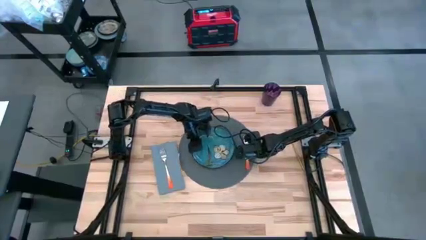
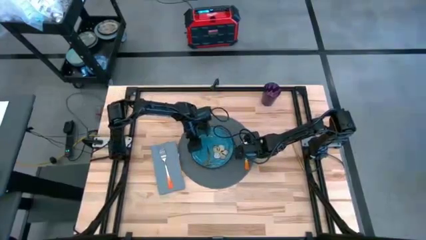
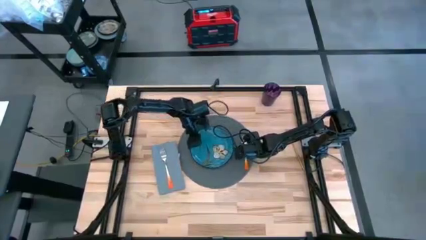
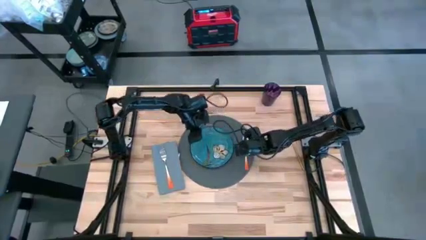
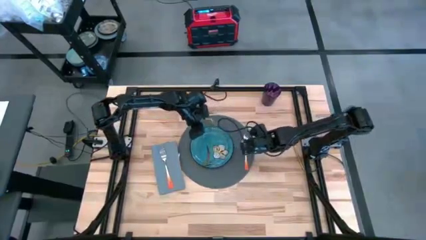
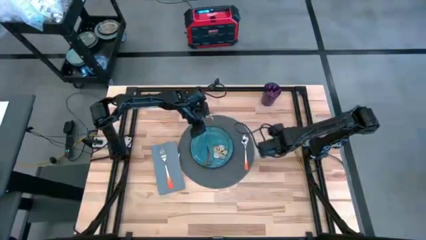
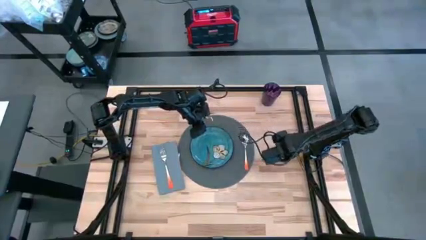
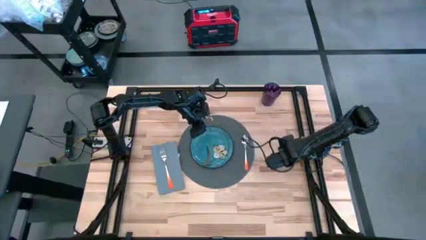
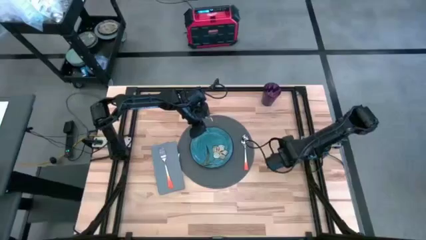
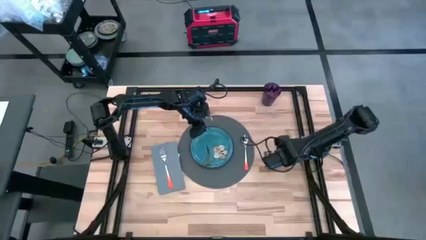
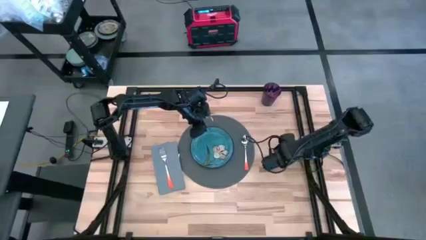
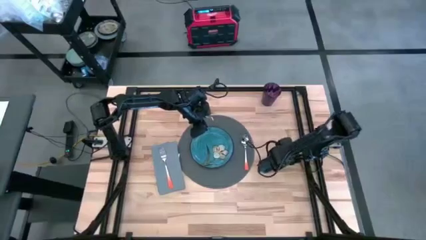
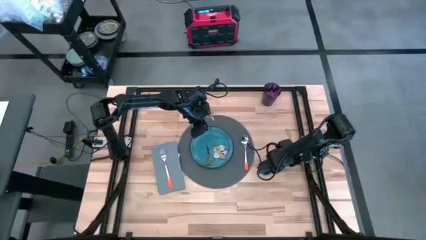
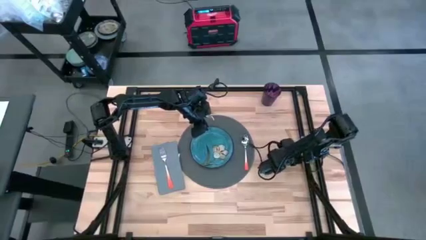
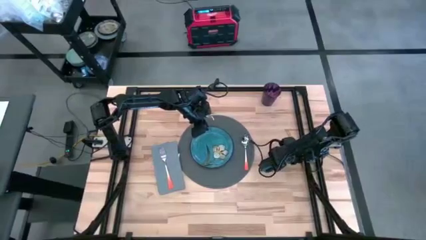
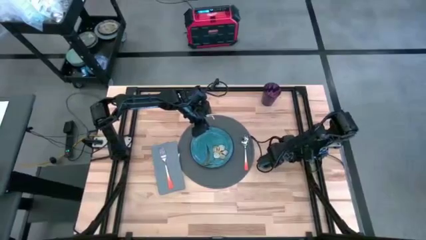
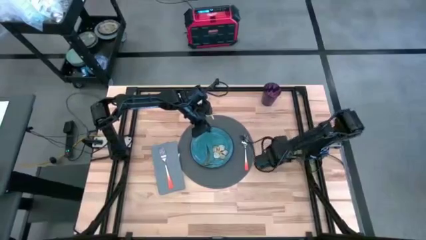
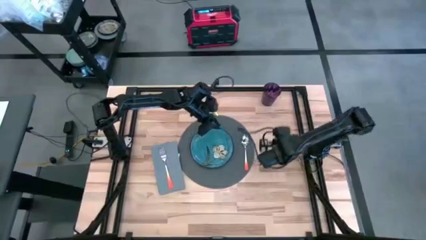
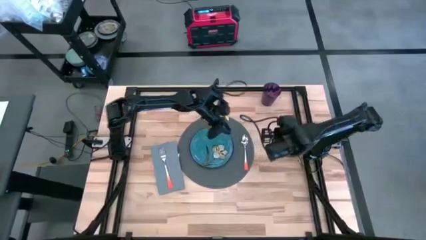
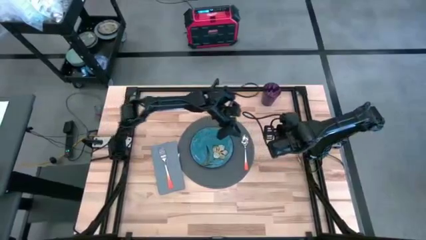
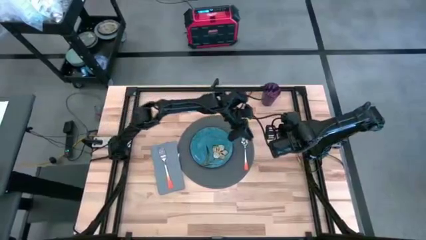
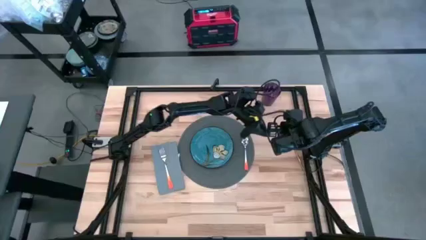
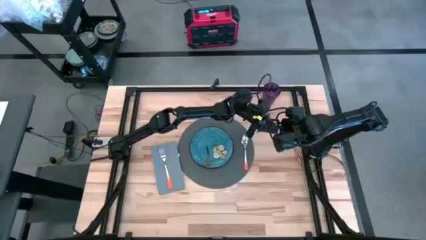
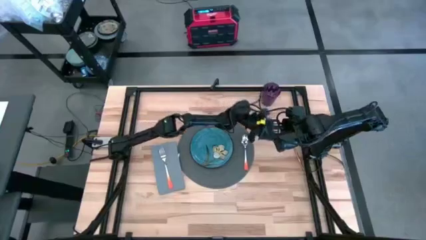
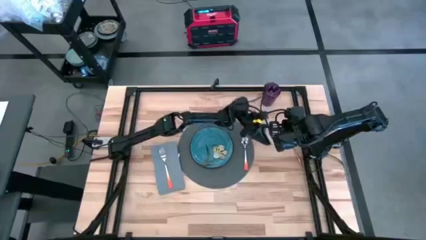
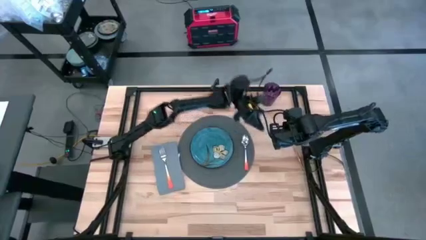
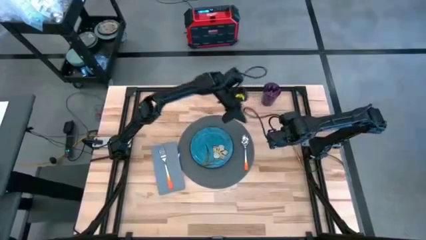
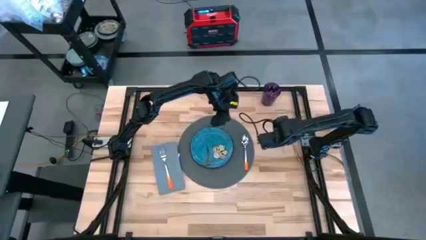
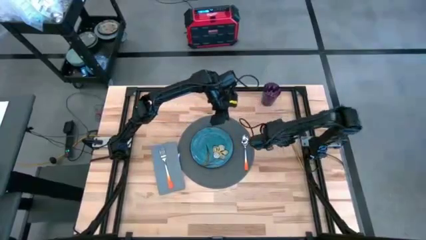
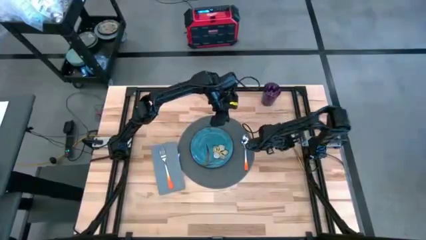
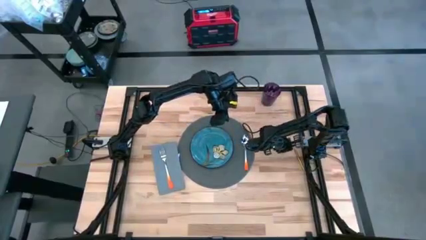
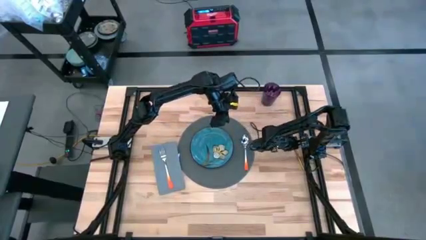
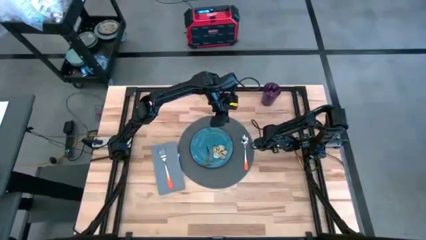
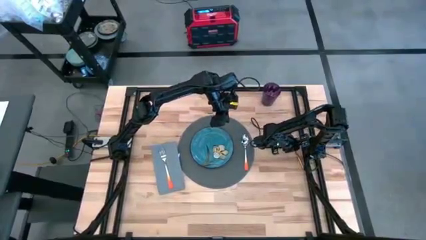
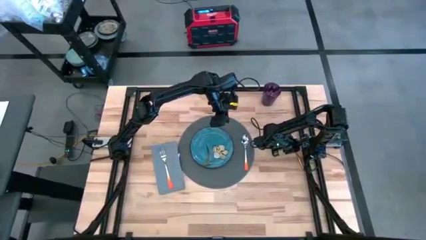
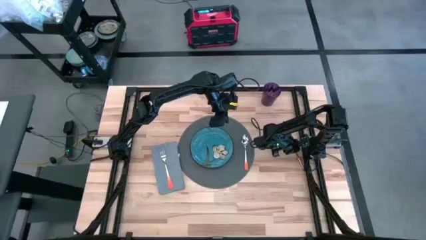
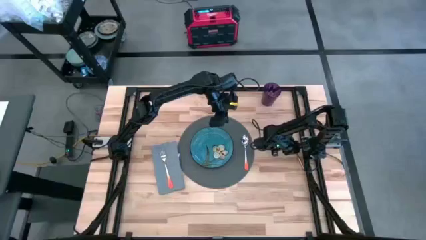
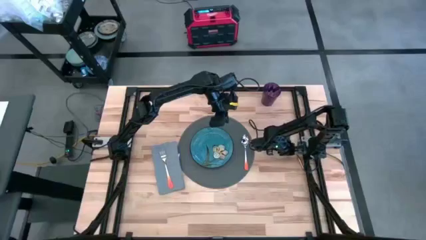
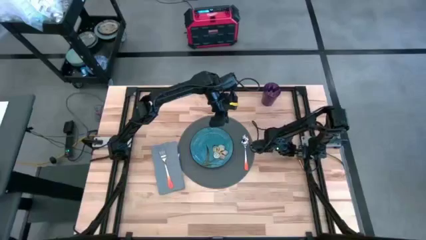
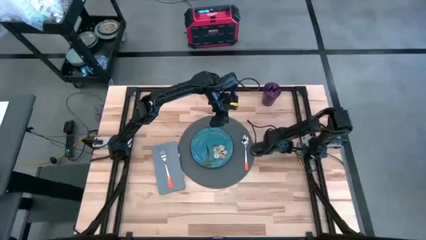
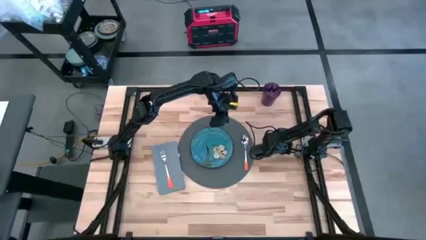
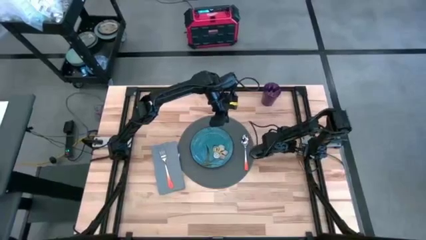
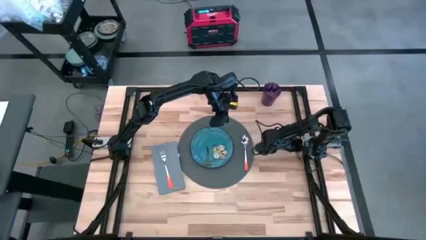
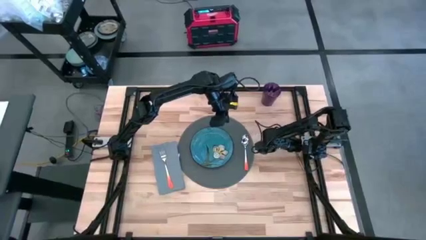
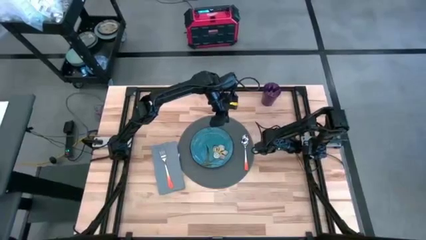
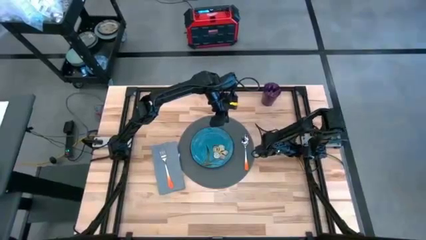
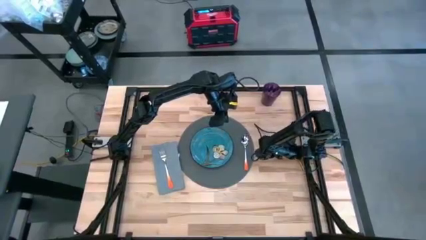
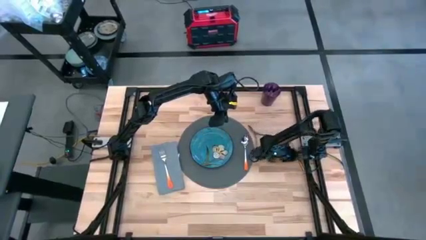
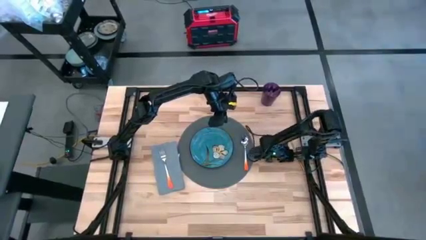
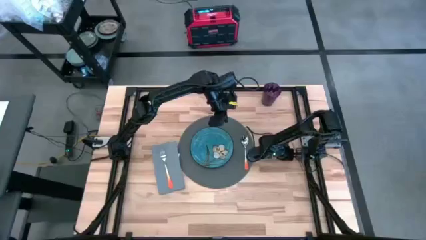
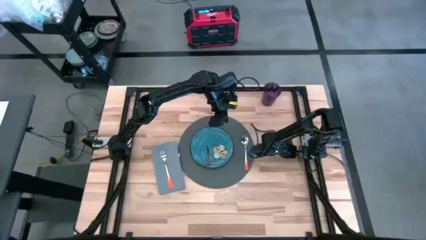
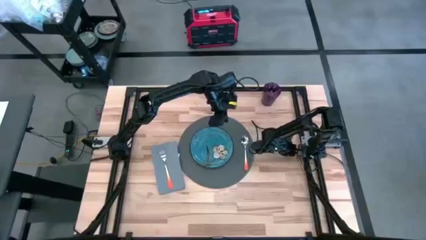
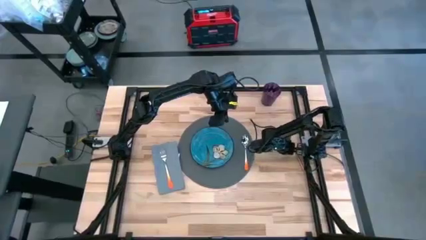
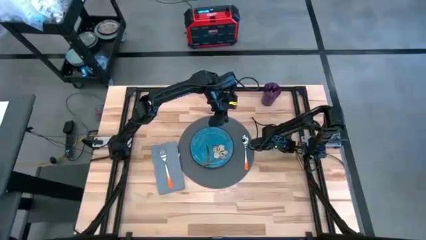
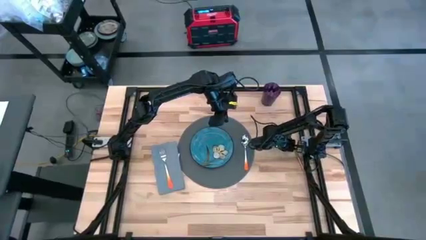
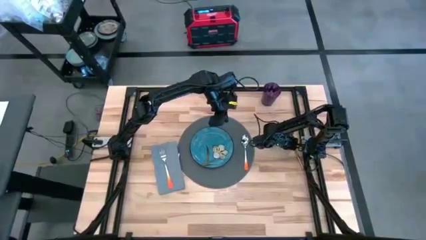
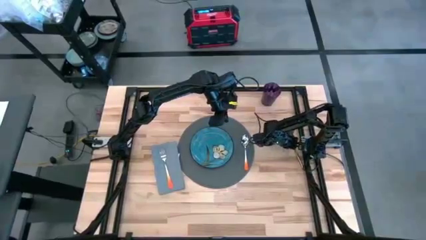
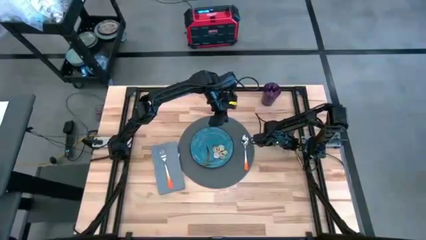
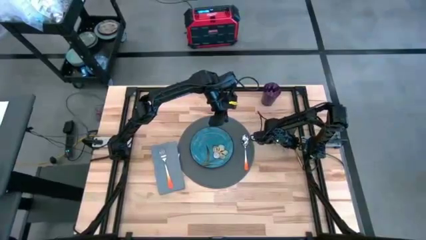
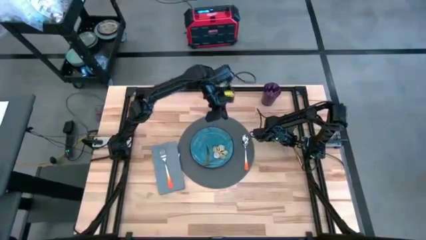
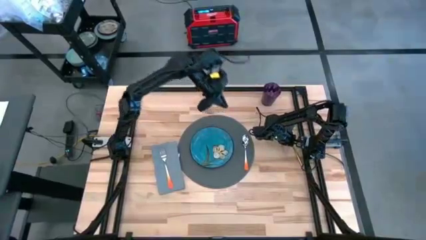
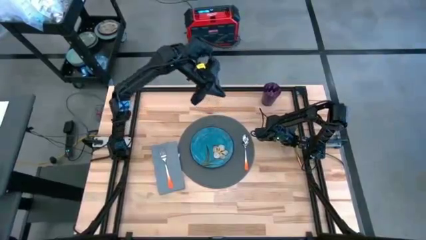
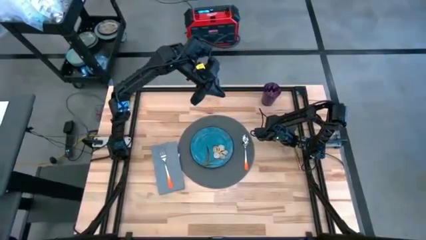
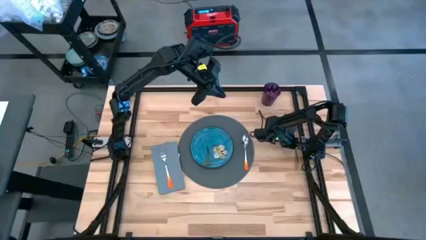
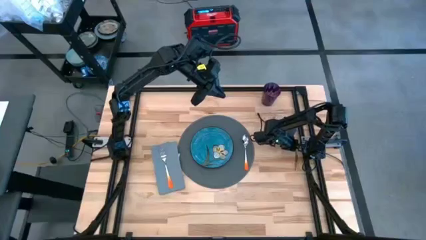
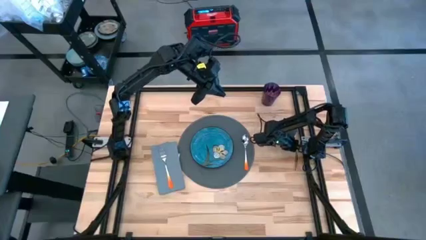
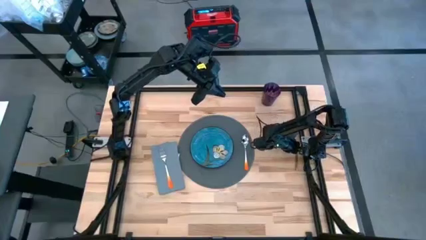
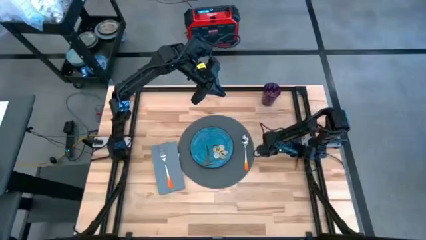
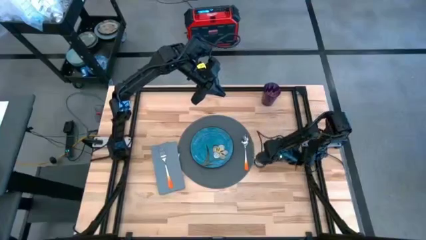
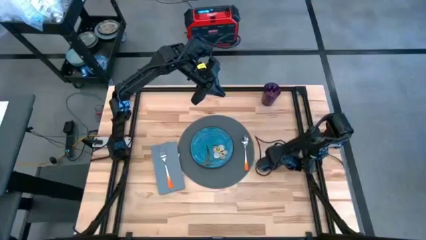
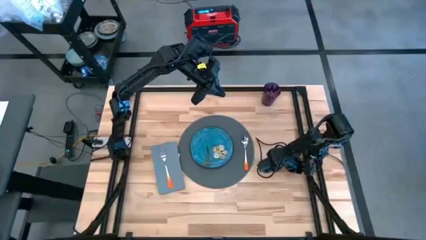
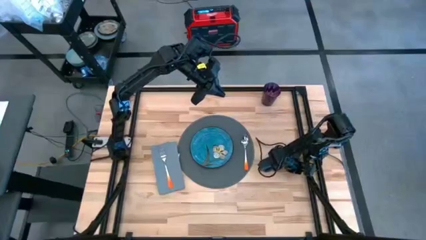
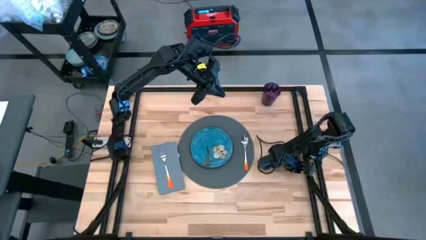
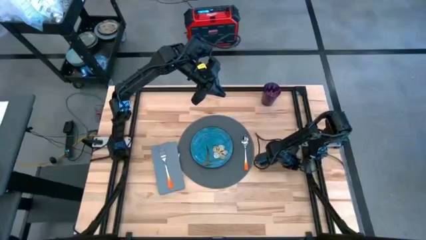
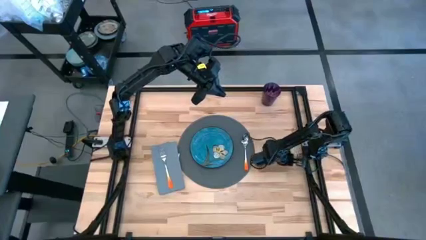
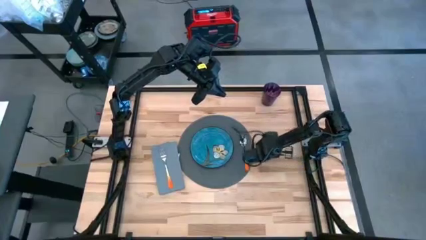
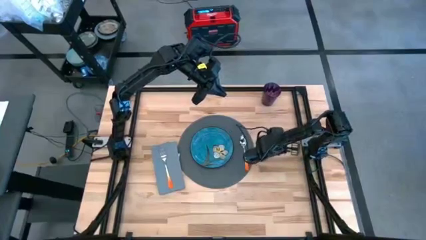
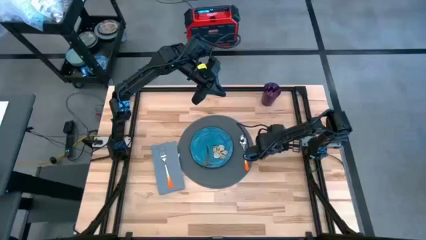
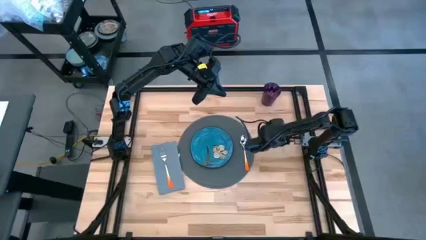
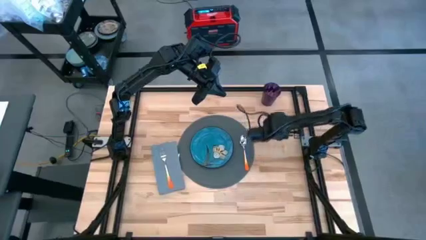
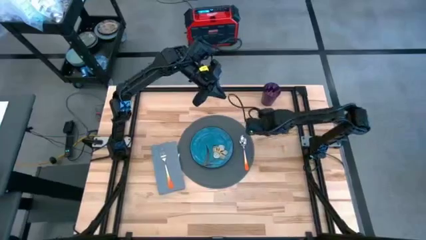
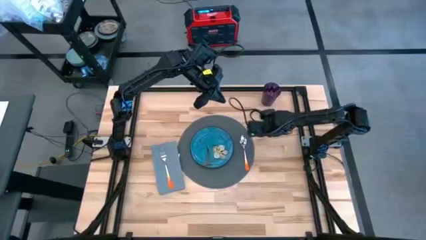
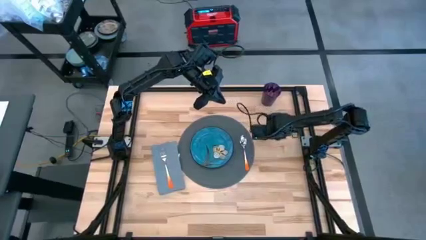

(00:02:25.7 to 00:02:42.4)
Task: Set table place
Put the gold knife on the gray placemat
